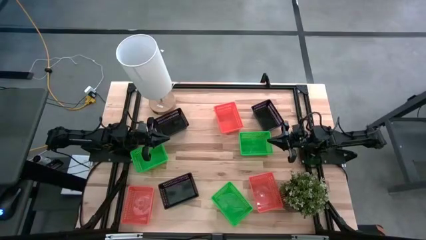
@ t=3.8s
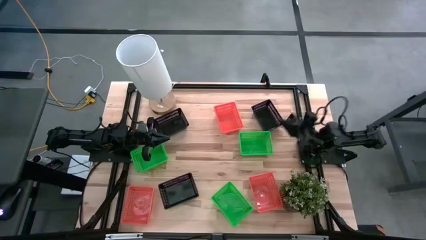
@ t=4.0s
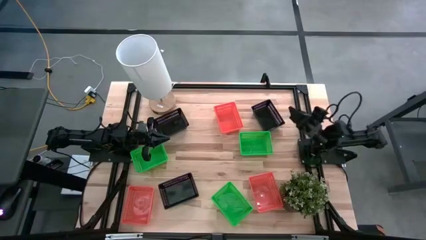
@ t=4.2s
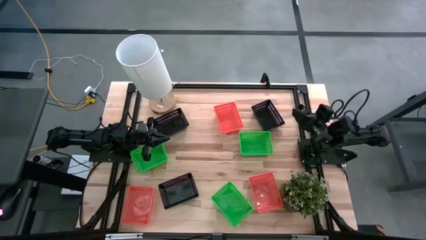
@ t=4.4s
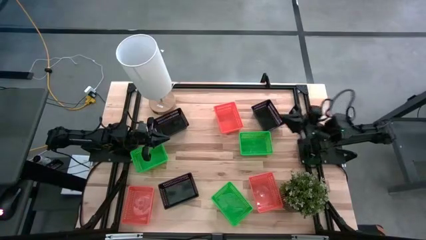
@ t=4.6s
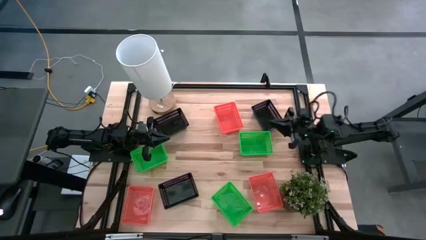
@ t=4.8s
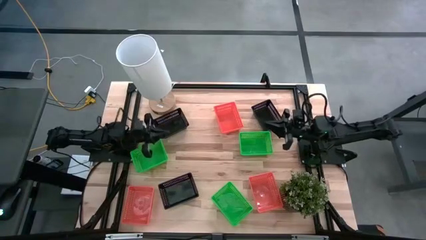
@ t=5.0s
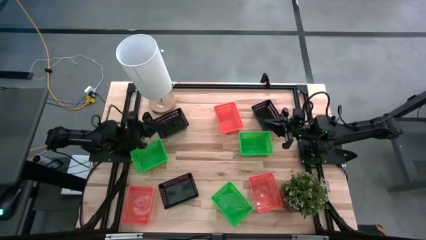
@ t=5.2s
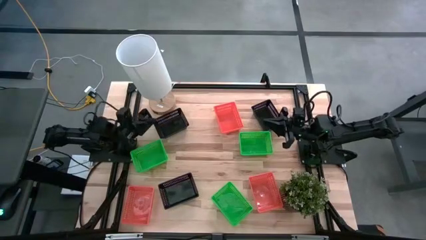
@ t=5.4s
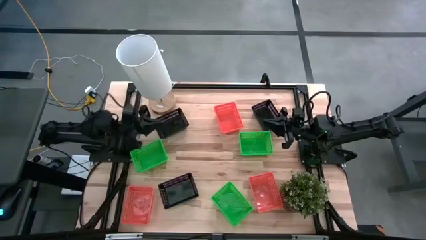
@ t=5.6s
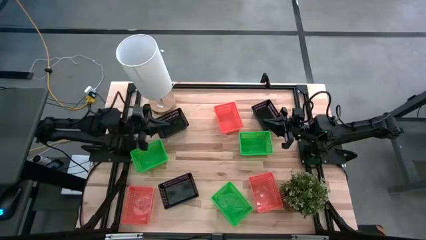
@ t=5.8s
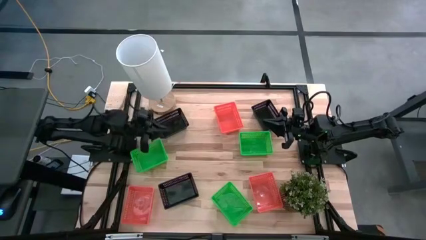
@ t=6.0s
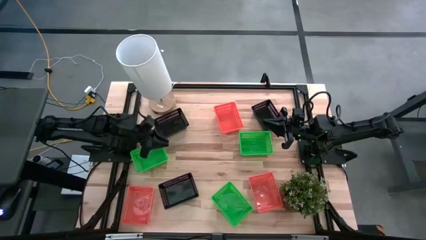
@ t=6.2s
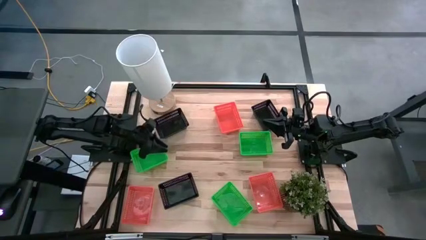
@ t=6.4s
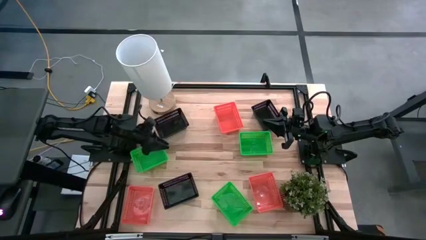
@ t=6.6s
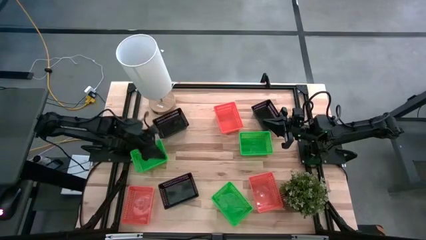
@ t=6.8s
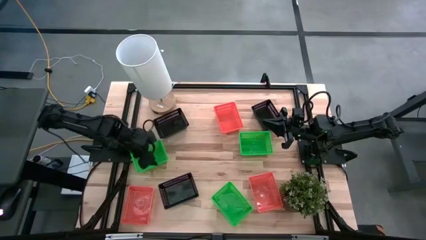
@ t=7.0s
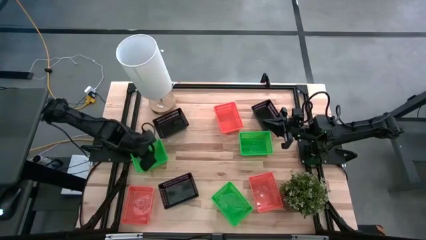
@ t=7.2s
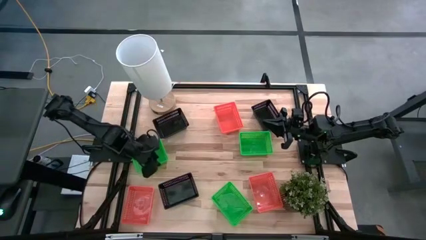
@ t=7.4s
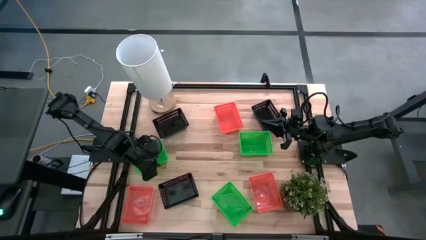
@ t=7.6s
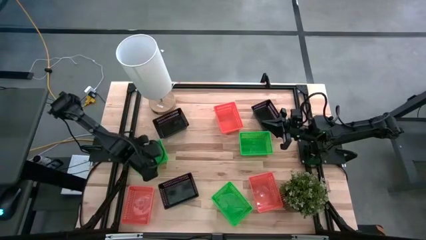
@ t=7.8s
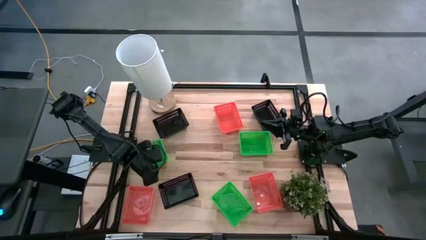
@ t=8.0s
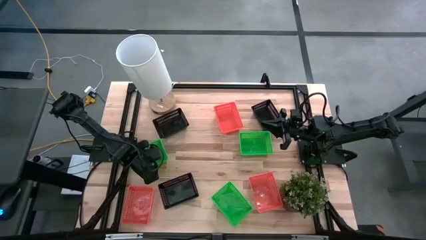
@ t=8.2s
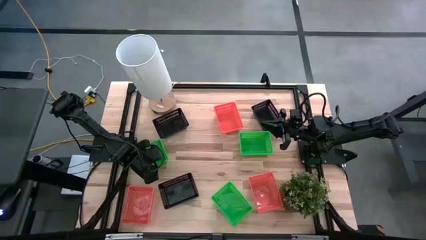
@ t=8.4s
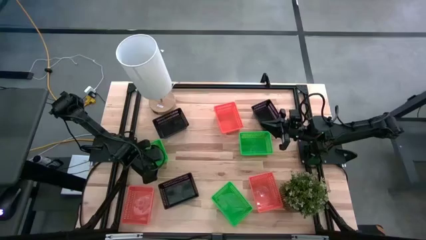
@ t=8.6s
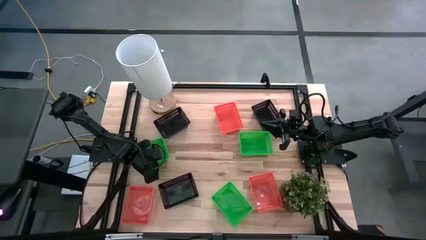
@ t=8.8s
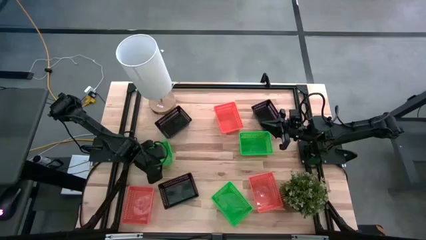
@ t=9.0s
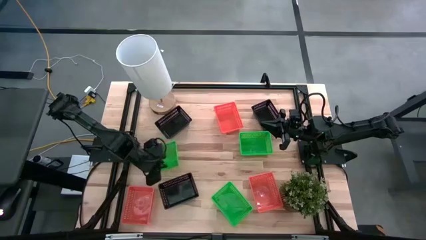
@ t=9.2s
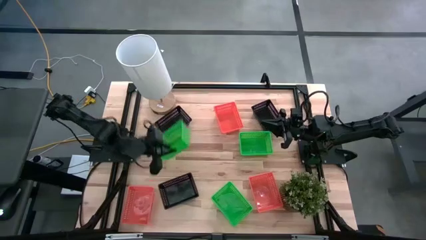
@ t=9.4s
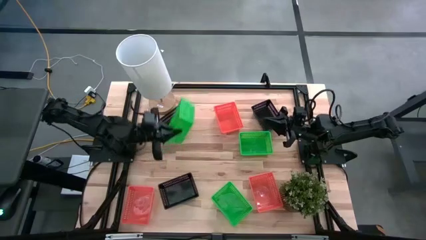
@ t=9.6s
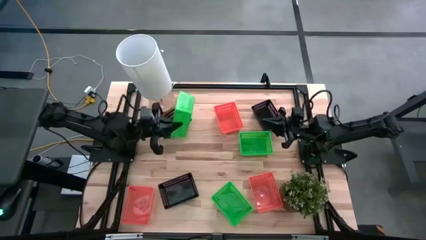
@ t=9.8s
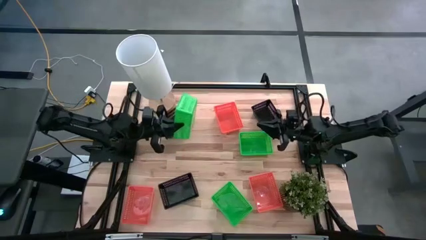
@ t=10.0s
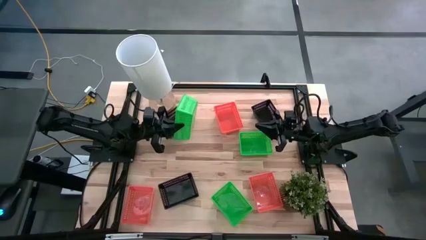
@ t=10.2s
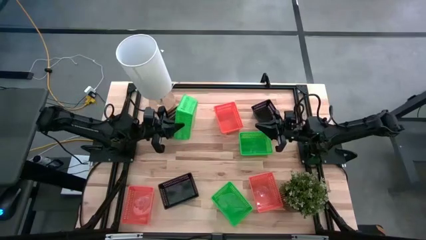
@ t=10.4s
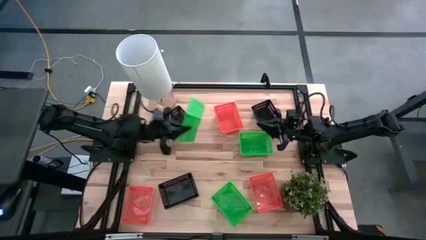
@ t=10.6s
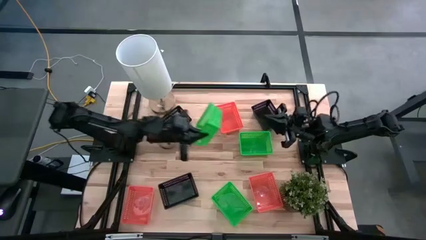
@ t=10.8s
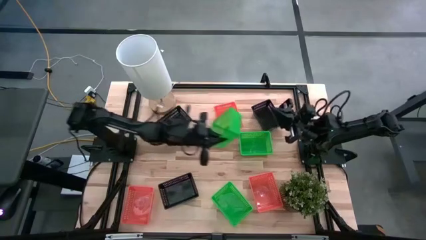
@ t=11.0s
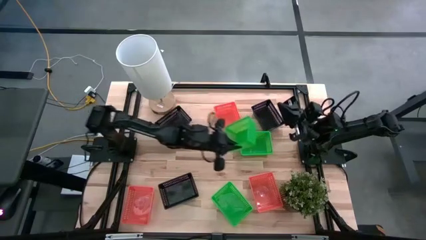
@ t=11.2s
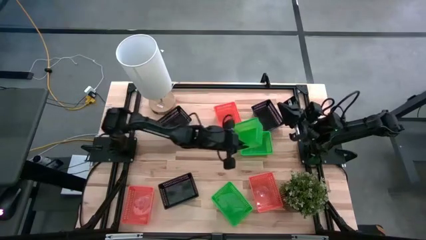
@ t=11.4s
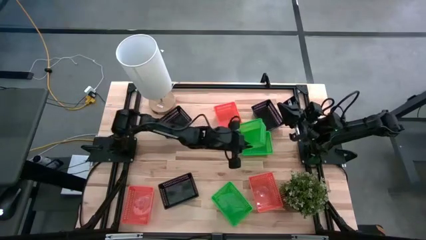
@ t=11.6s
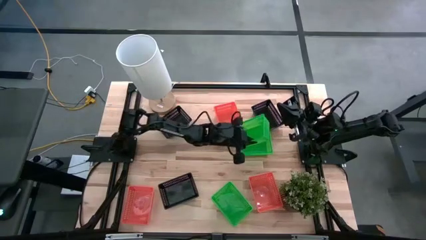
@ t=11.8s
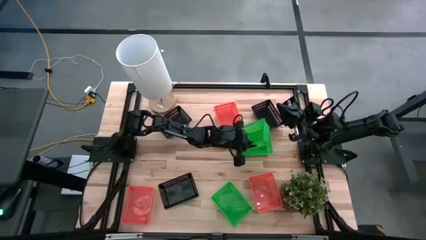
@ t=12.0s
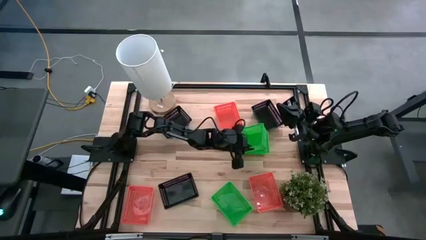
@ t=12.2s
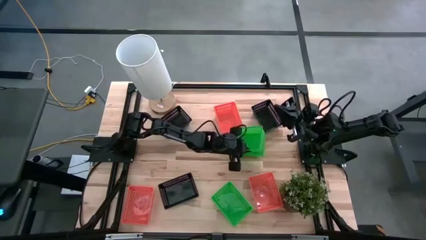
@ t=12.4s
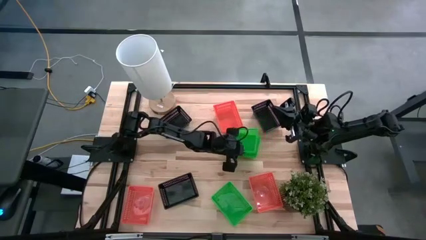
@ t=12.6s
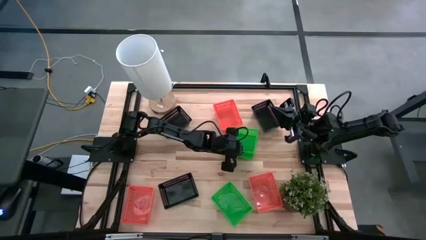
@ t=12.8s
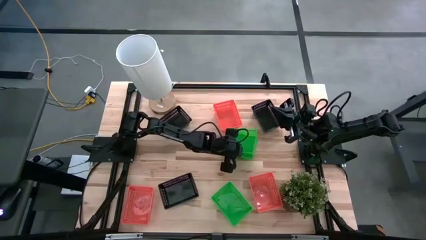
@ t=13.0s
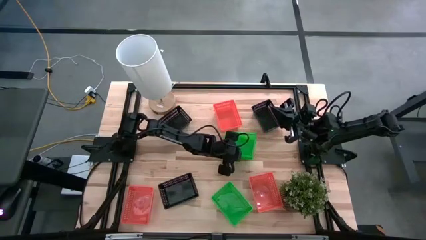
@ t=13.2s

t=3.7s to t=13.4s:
Stack the top left green bin on top of the right green bin

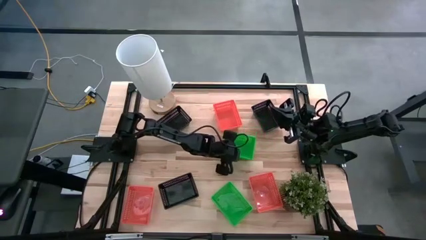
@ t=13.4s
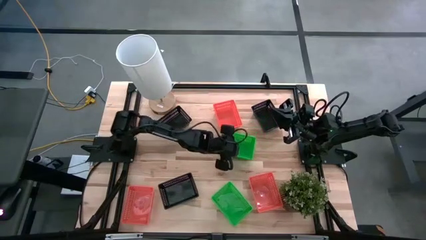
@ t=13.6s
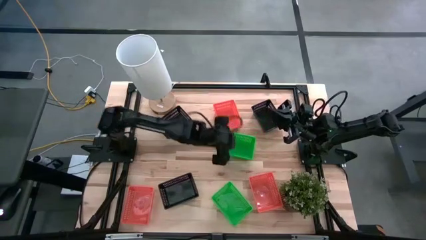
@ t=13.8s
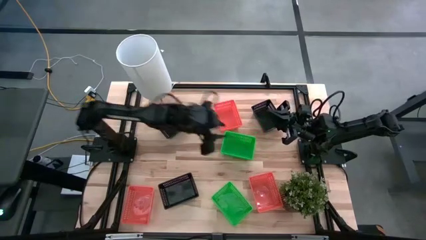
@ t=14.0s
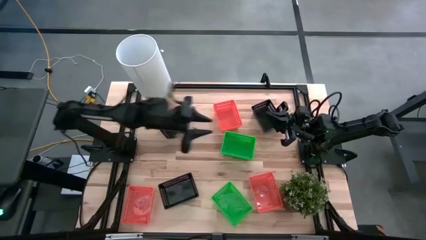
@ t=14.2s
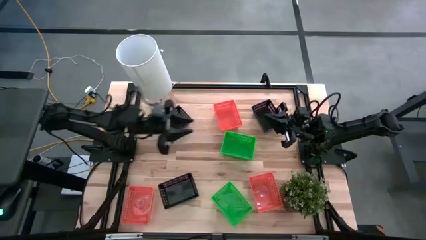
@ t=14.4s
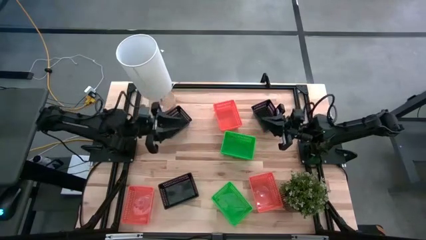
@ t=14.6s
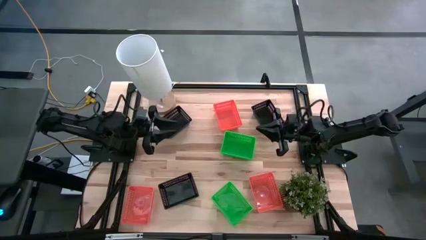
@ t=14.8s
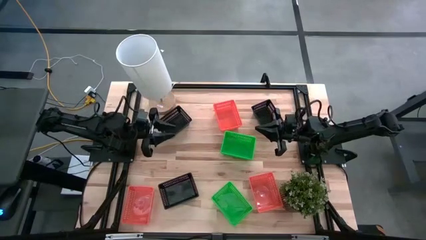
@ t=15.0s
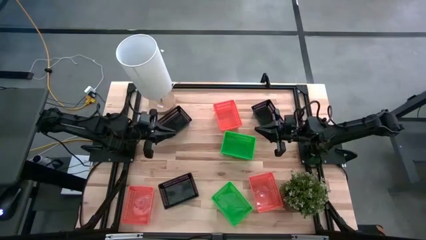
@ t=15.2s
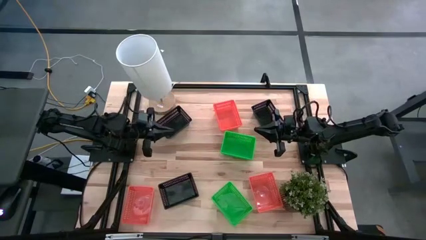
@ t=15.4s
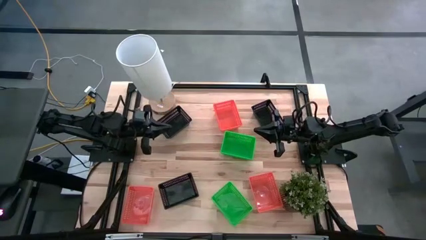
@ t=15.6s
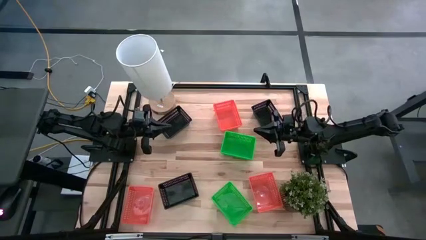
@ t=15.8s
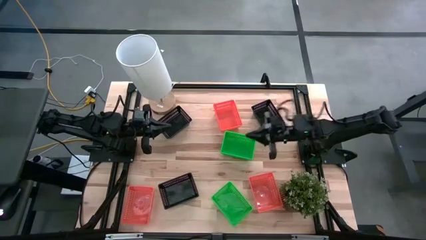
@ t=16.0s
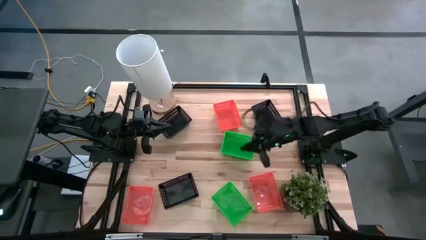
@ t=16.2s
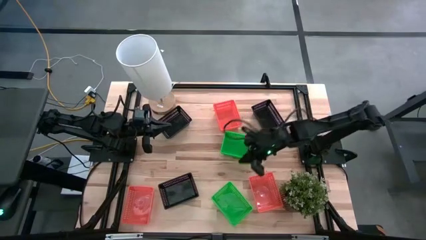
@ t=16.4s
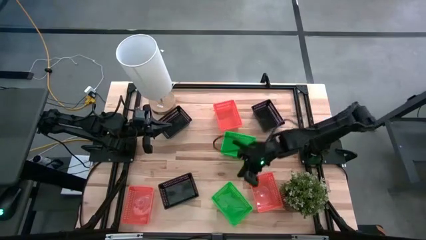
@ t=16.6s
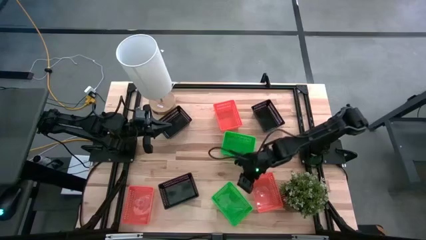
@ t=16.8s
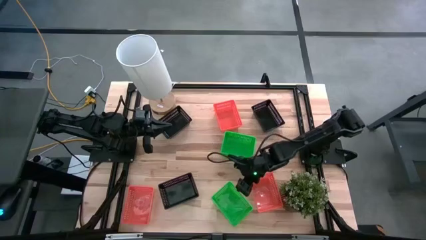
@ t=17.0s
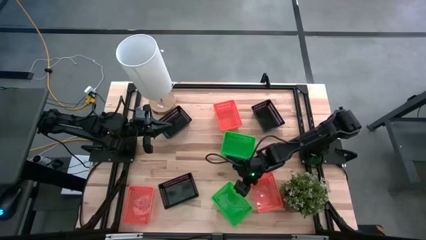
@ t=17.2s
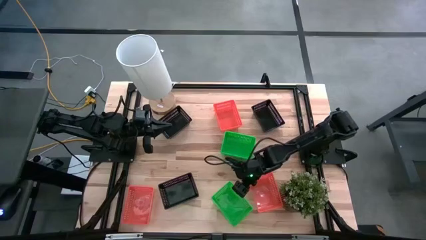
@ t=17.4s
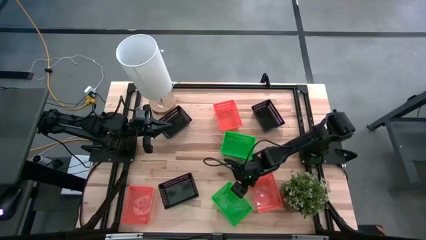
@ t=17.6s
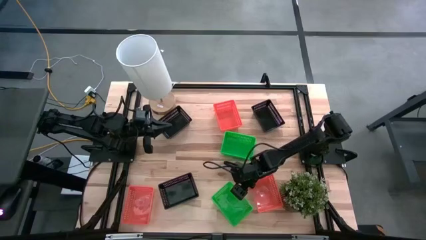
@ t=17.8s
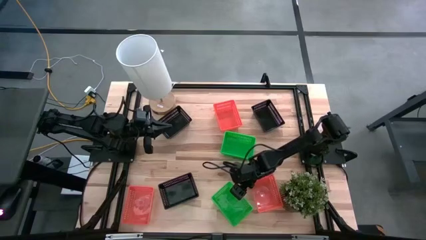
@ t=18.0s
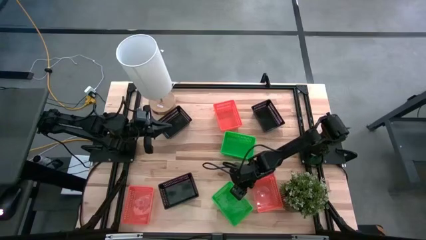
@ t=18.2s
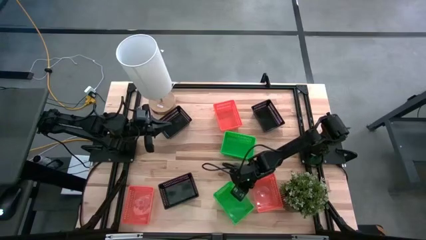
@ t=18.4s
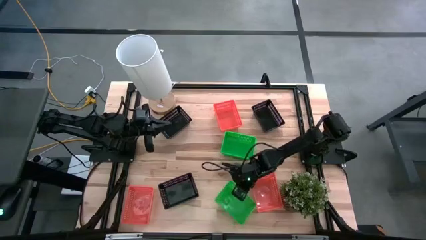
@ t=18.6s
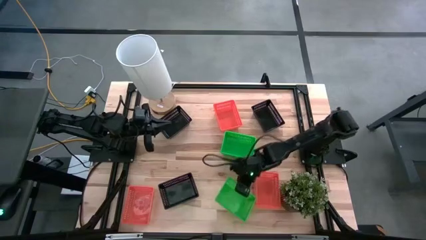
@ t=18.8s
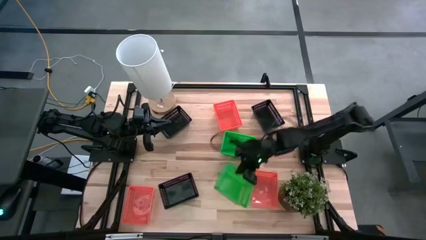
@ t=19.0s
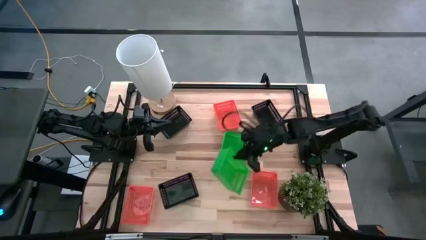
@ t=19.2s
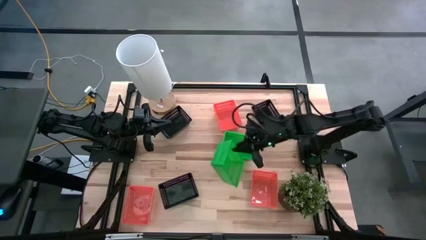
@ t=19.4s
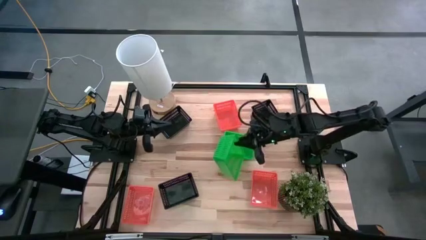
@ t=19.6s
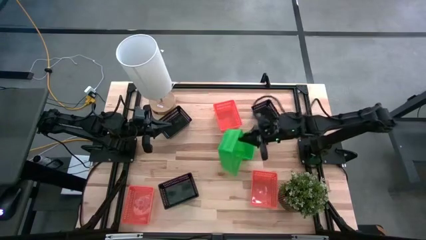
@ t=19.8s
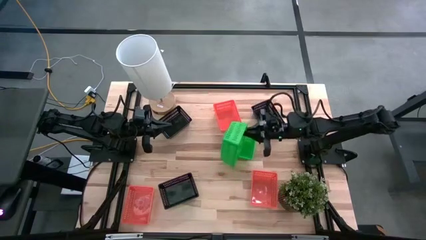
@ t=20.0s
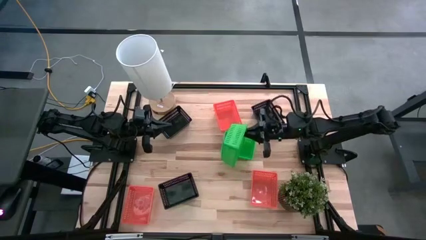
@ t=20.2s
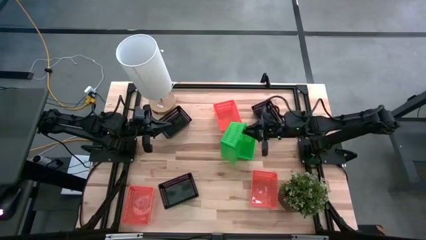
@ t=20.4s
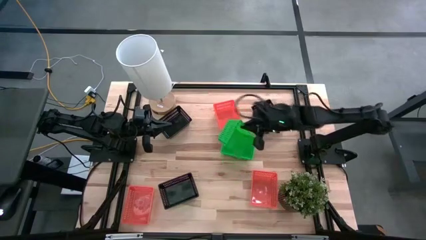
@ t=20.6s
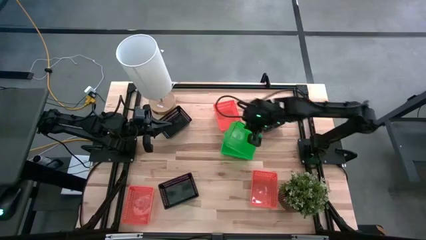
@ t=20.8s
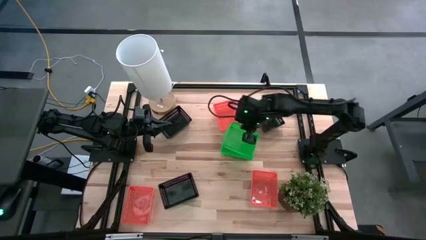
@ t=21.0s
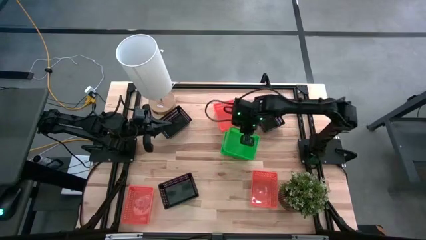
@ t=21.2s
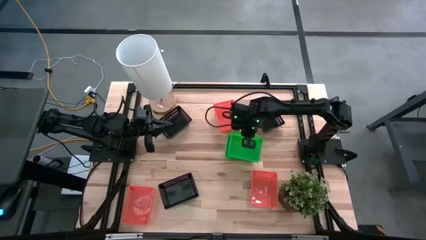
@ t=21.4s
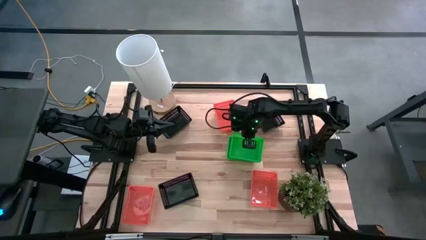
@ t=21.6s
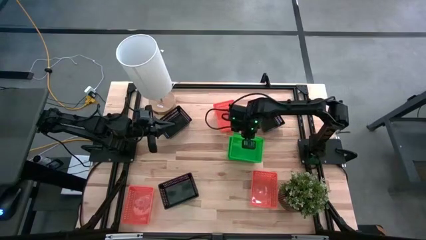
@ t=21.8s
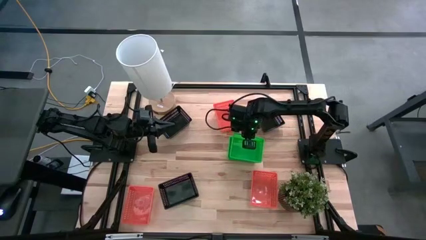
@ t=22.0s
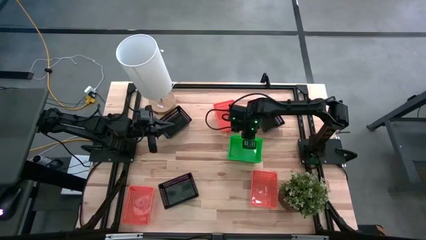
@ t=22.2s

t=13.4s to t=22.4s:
Stack the bottom green bin on top of the top green bin
